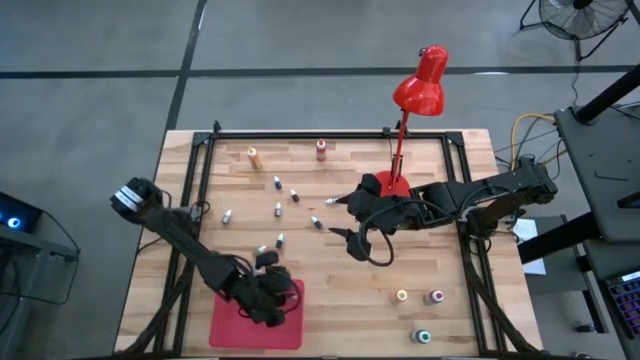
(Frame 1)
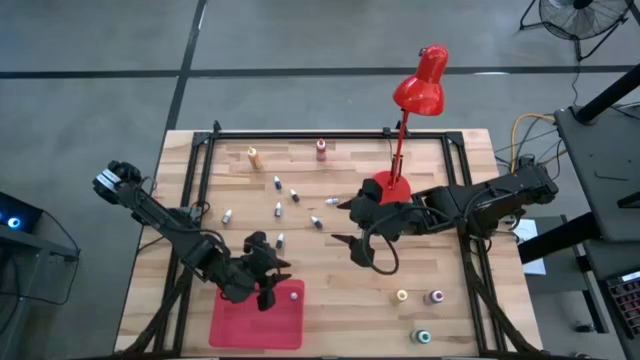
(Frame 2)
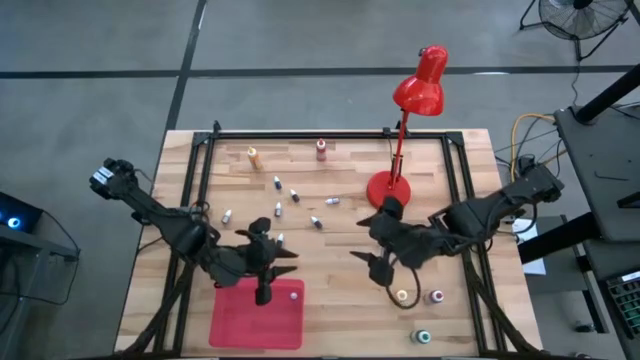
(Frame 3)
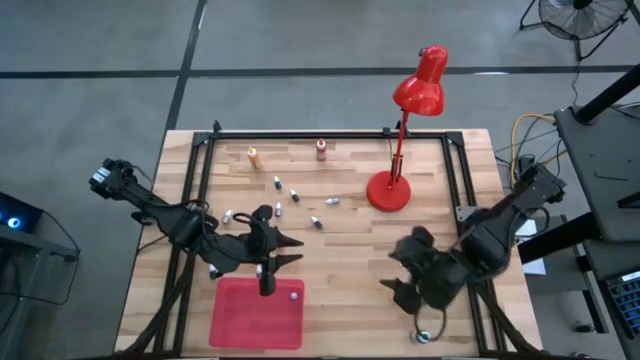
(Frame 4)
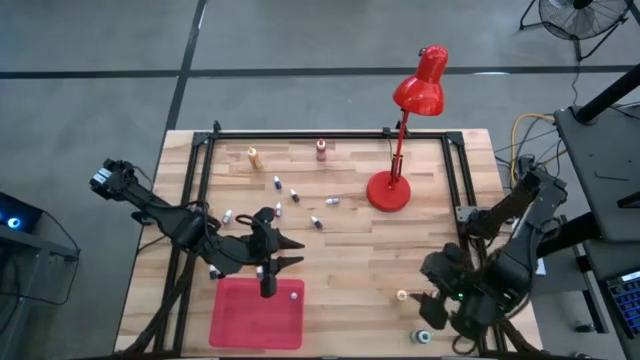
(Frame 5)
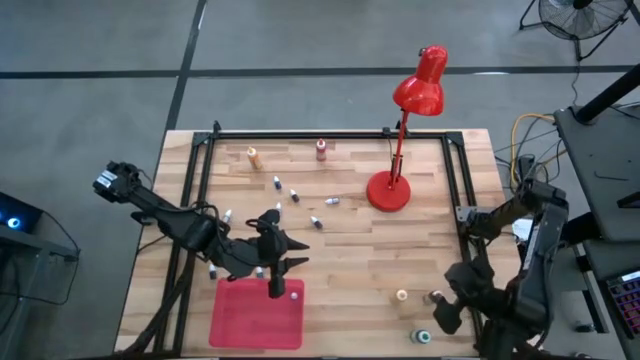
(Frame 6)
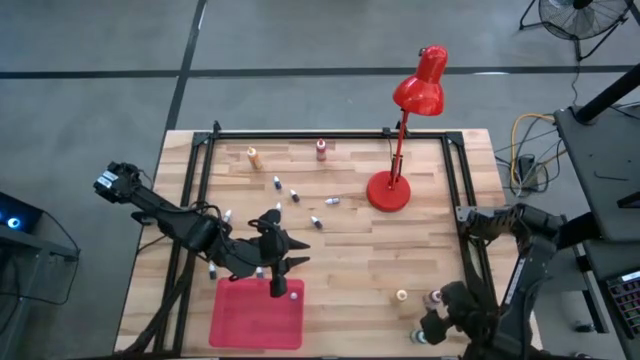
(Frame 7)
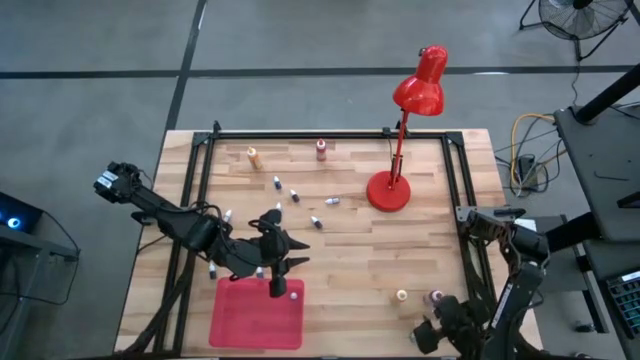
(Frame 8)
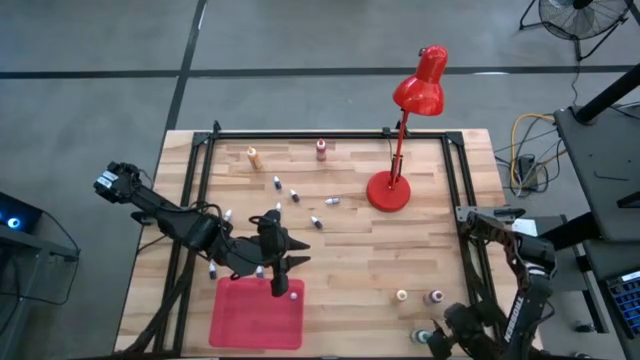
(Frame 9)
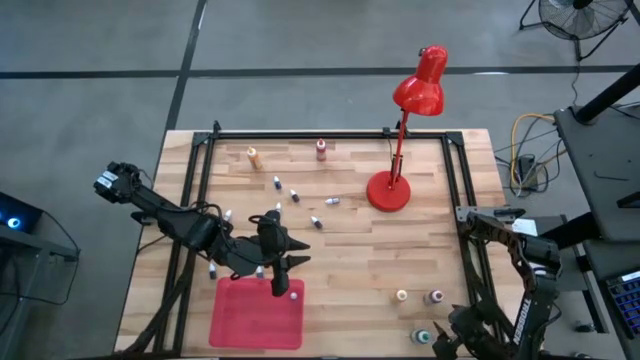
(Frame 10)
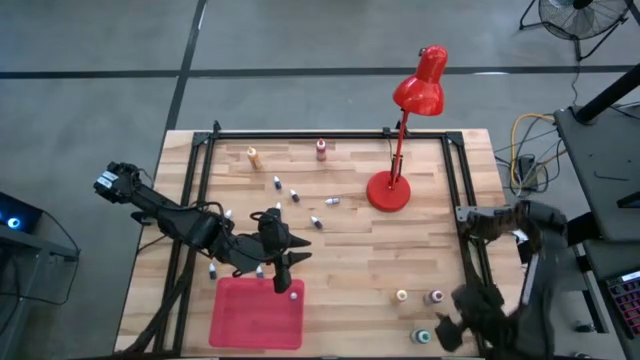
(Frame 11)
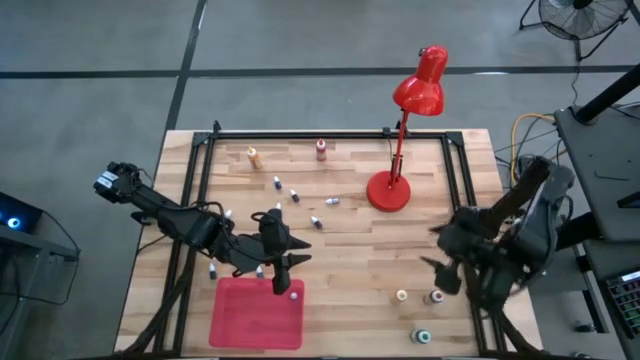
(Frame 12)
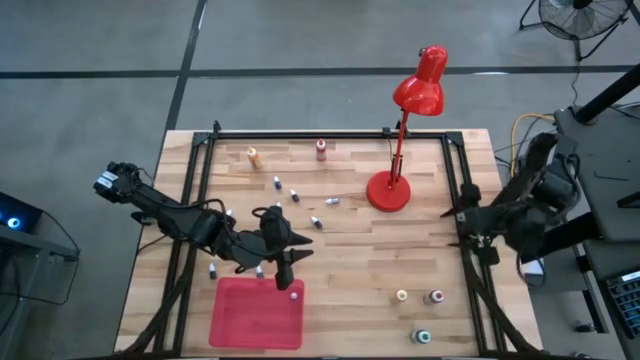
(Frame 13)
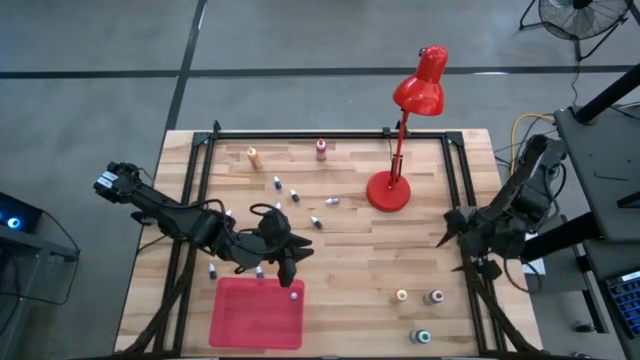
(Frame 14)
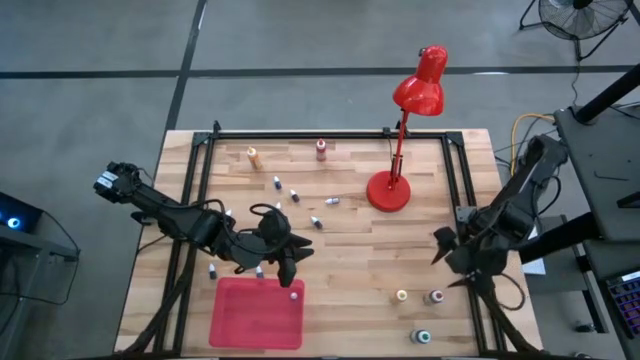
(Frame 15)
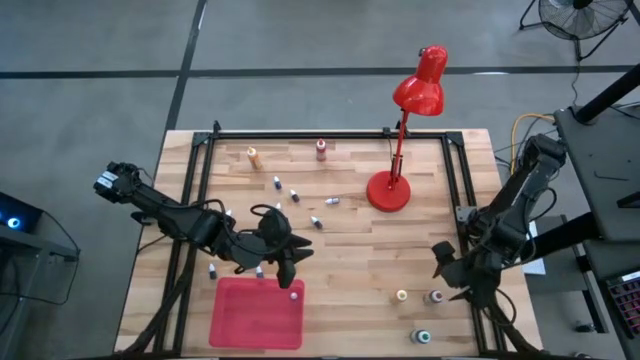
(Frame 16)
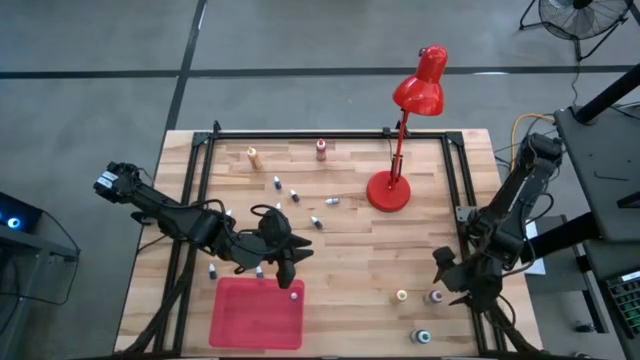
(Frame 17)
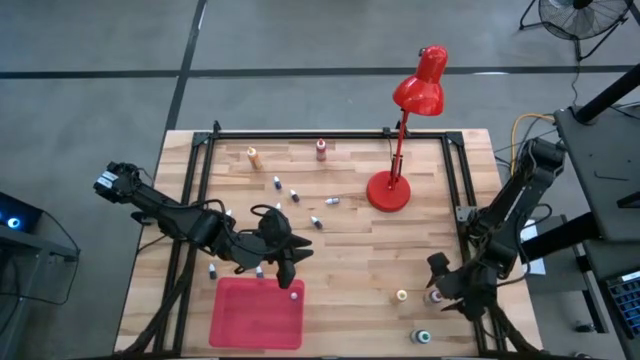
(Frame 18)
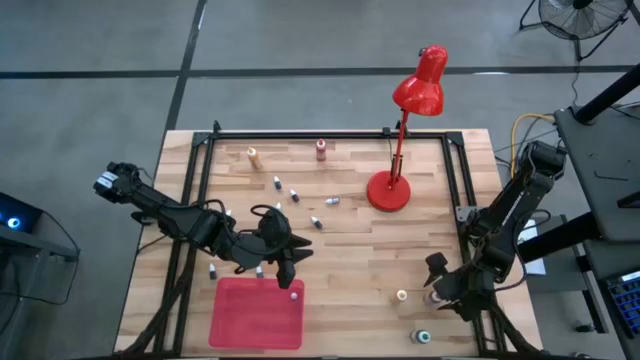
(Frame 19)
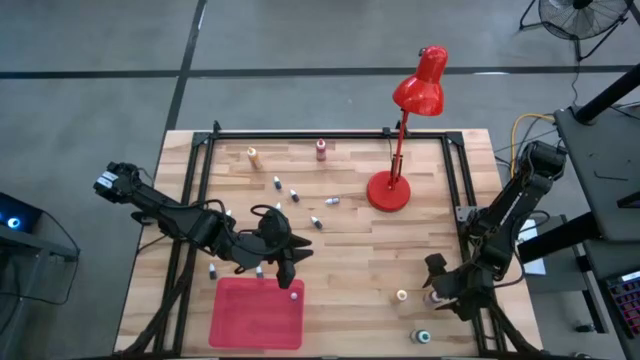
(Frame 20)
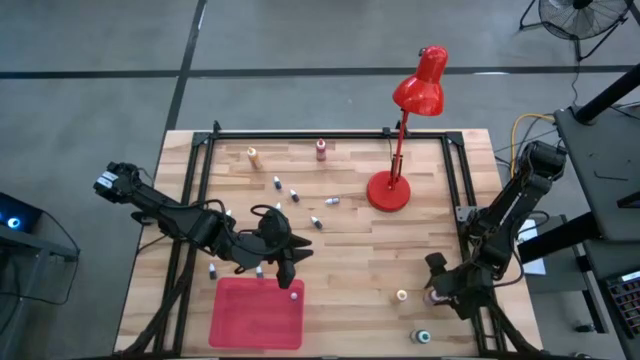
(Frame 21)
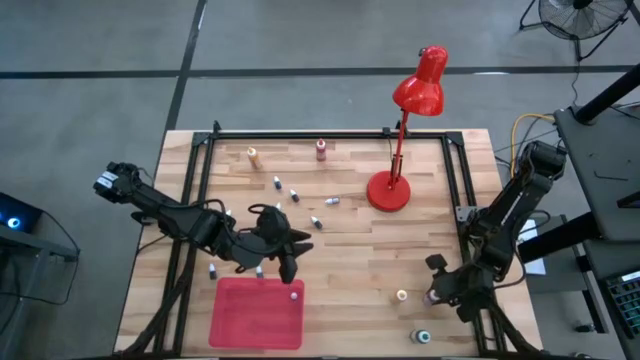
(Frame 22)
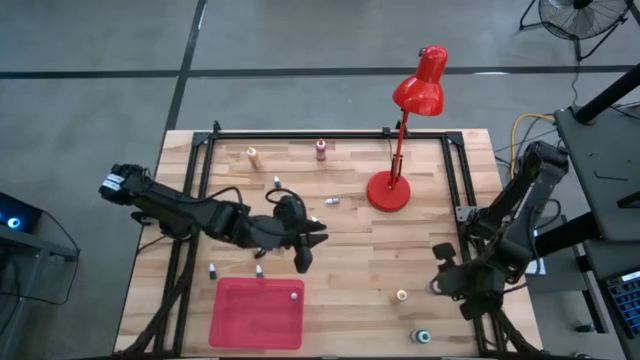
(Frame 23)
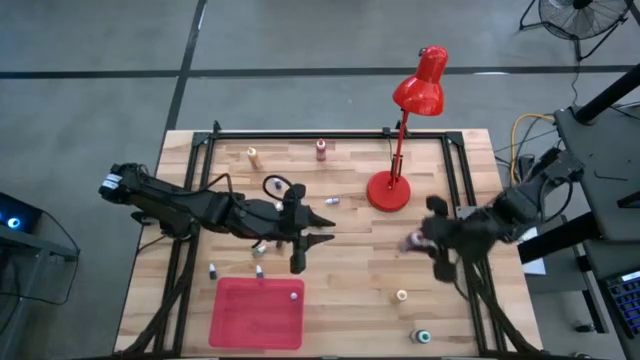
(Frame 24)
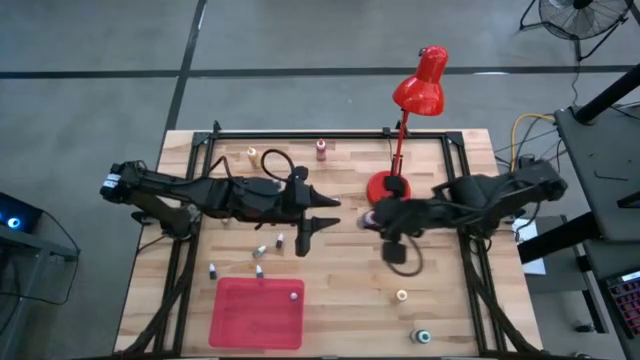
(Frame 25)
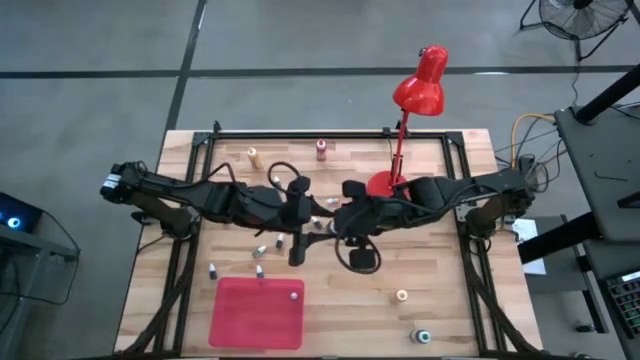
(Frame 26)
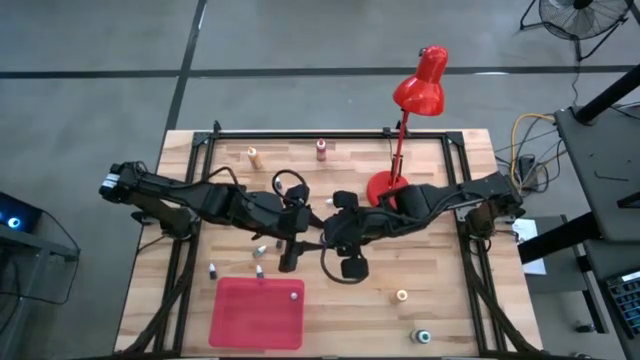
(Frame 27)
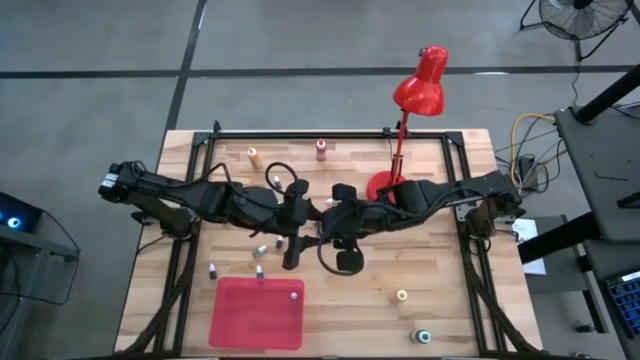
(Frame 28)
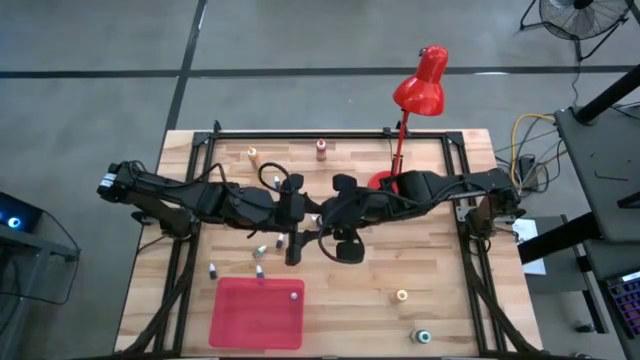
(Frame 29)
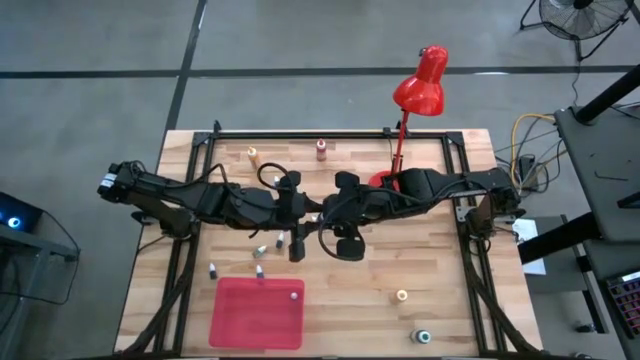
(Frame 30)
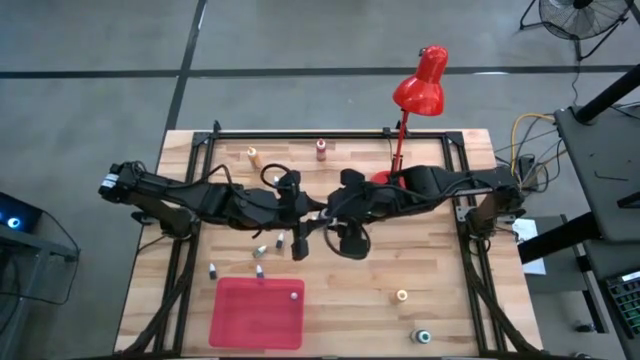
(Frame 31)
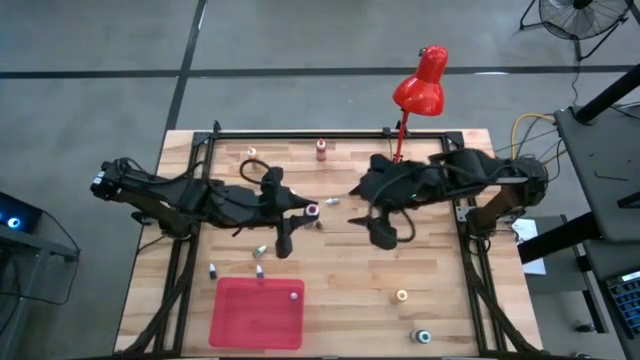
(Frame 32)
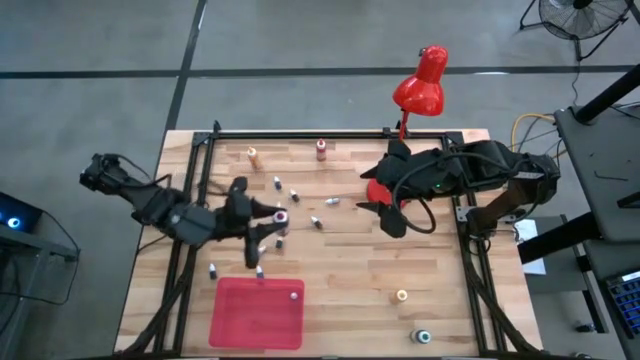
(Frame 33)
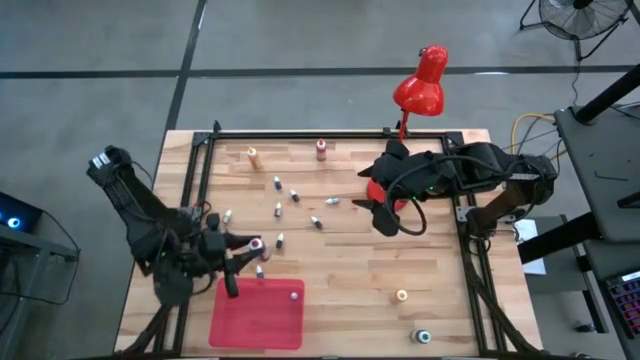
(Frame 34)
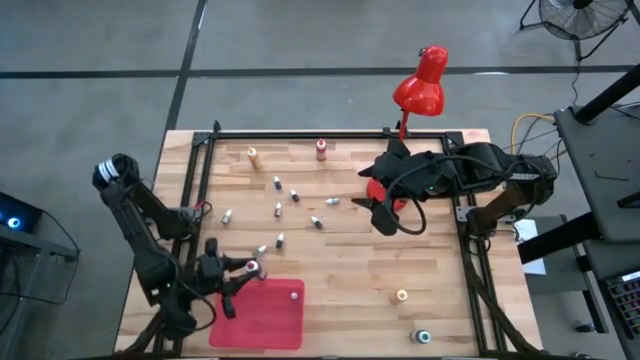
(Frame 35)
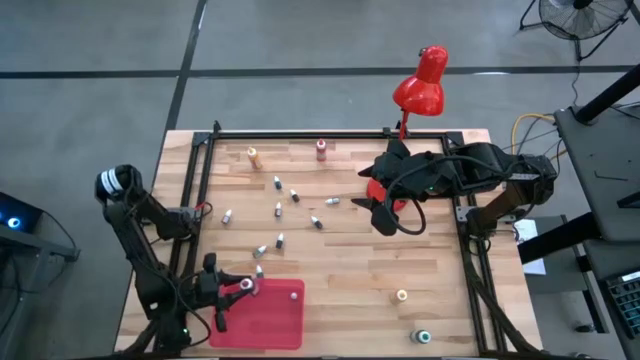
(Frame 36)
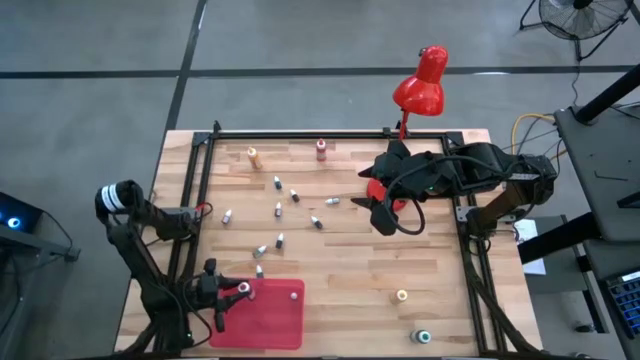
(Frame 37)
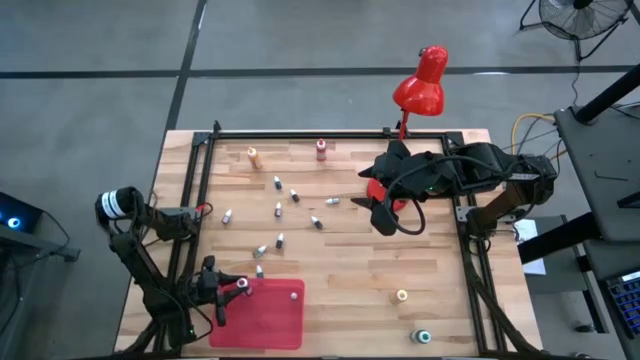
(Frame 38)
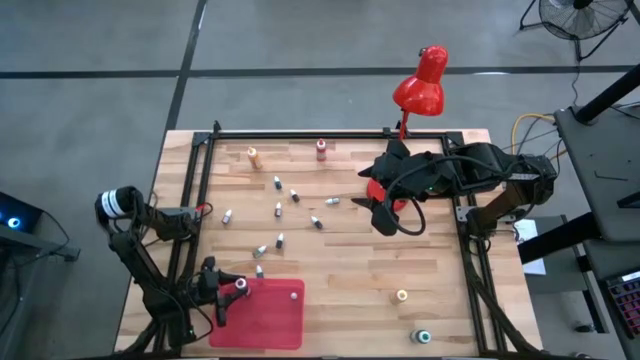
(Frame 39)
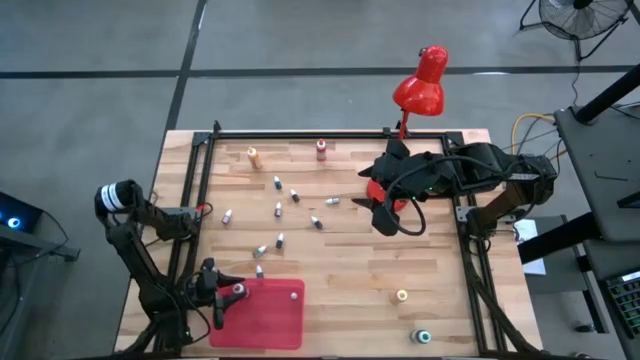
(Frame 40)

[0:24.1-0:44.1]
Task: Pick & Place food coloring
Put the large red food coloring bottle into the red bin

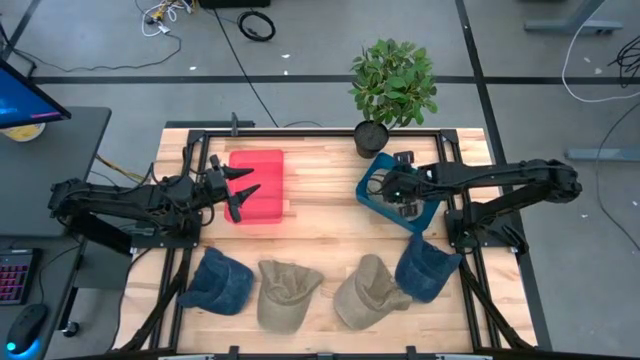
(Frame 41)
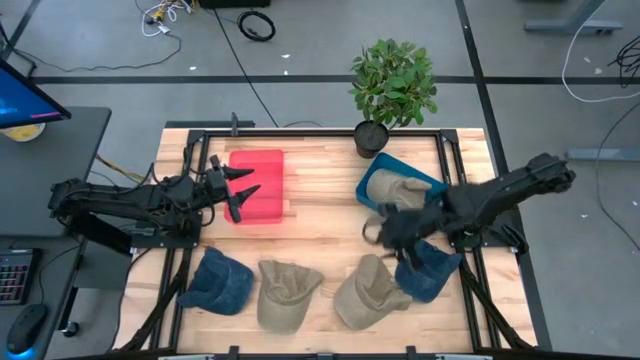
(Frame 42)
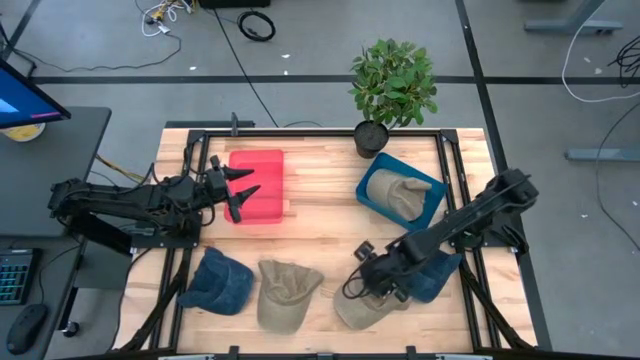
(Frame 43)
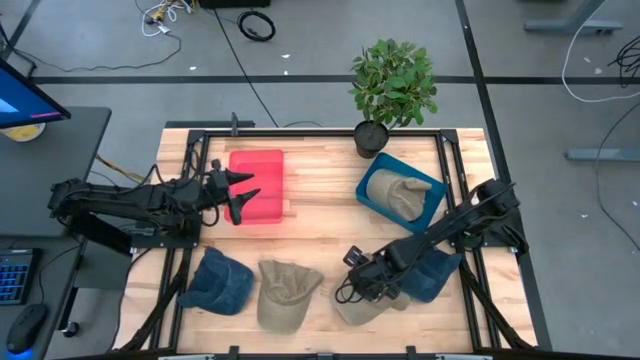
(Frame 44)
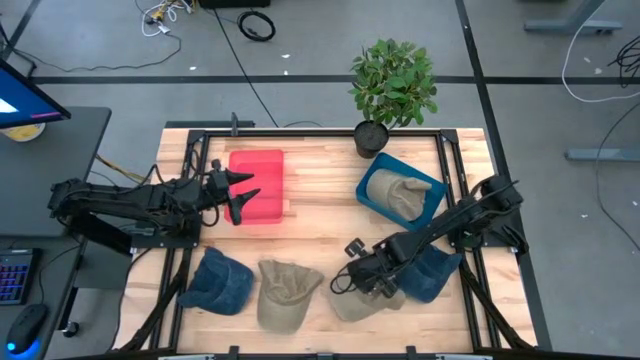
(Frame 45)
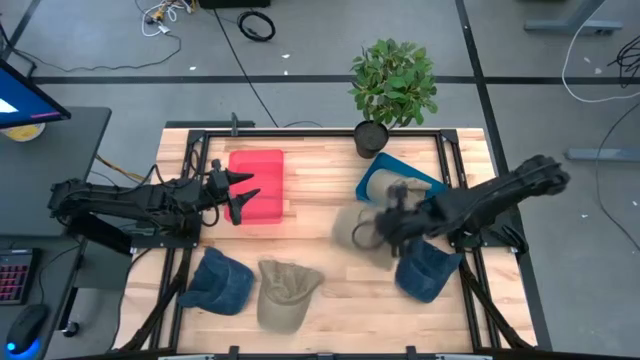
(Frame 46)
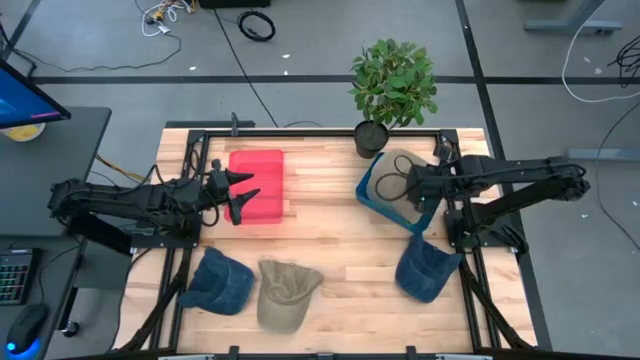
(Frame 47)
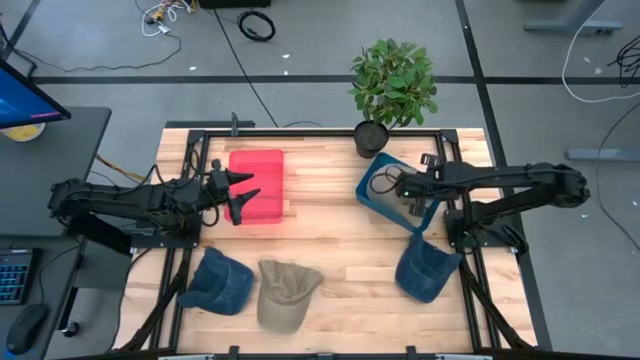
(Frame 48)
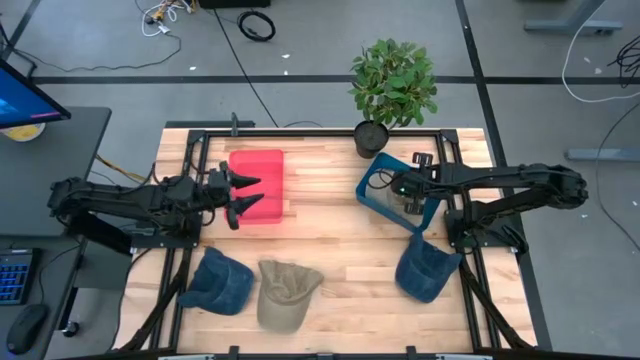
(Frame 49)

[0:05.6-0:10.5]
Task: Pick & Place hat
Put the right brown cap into the blue bin
